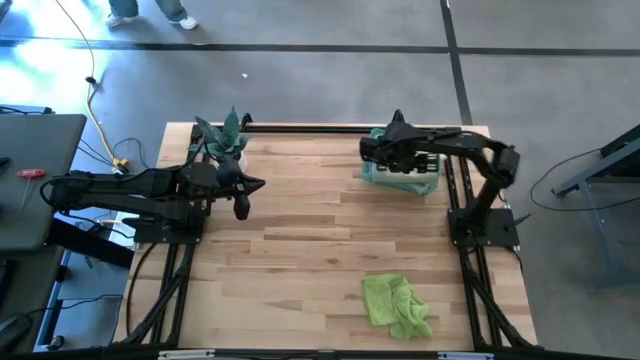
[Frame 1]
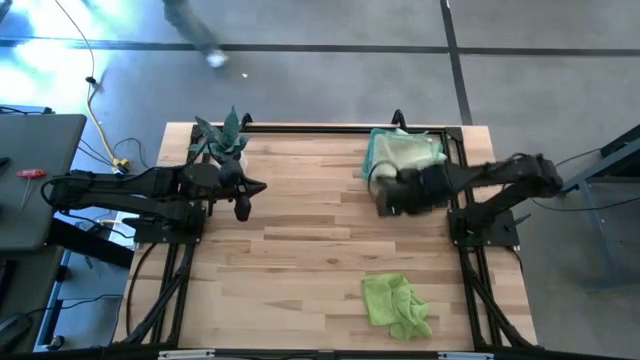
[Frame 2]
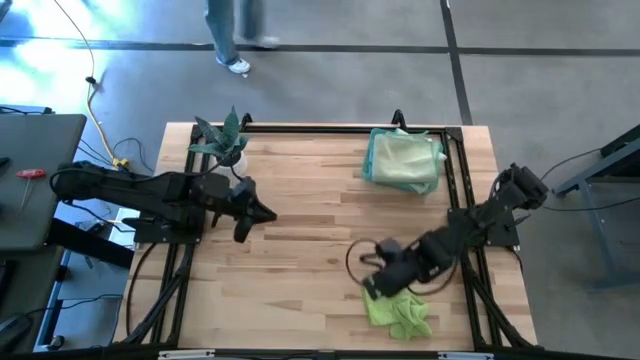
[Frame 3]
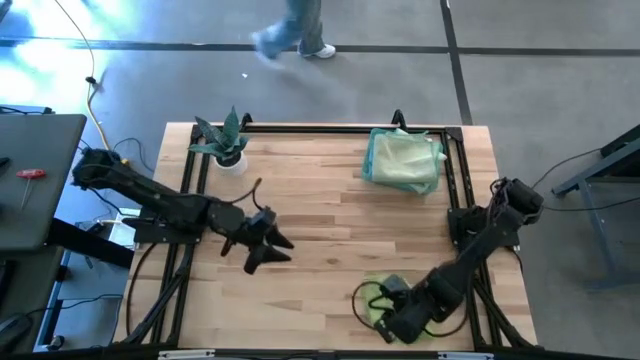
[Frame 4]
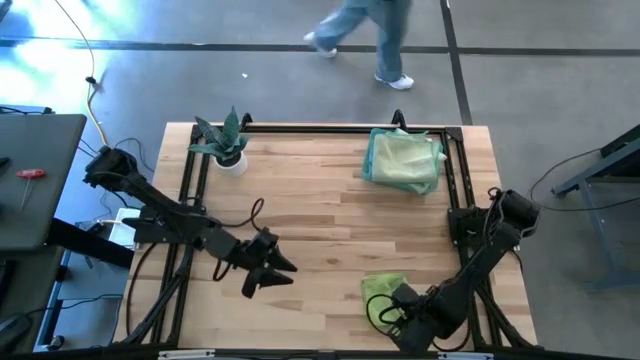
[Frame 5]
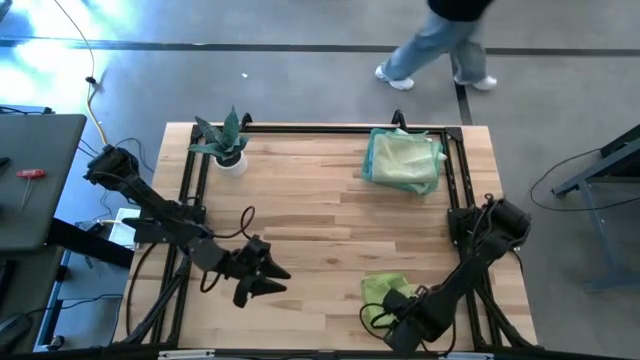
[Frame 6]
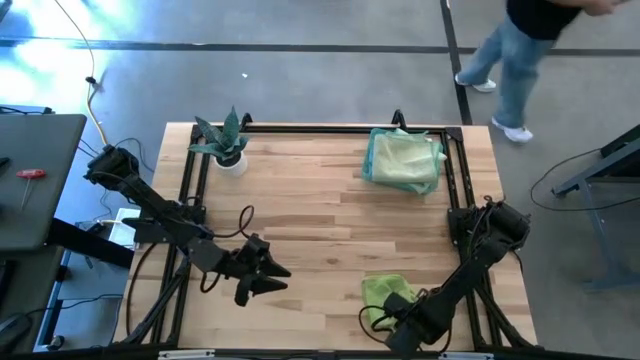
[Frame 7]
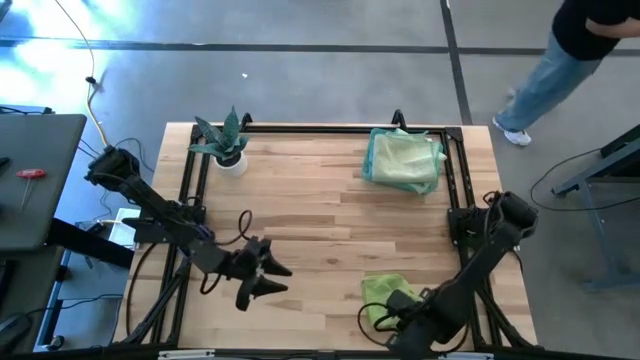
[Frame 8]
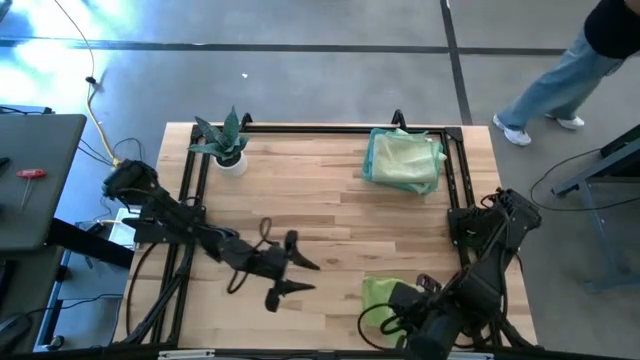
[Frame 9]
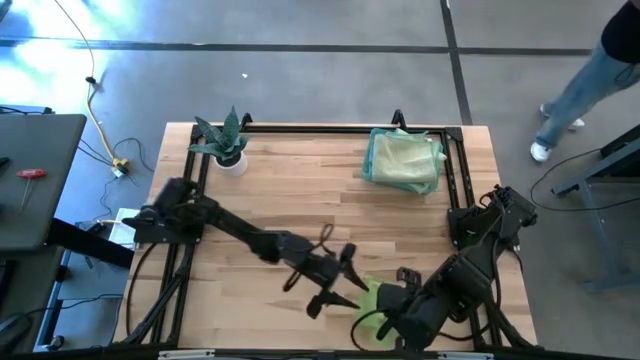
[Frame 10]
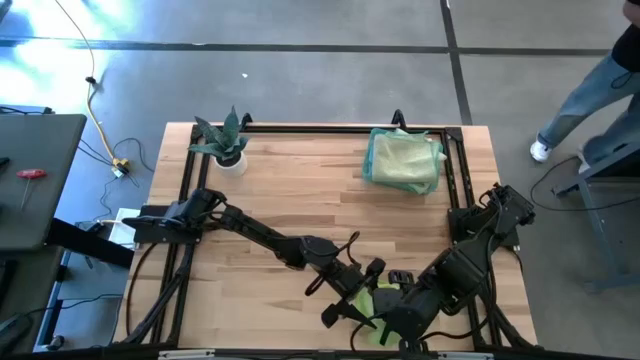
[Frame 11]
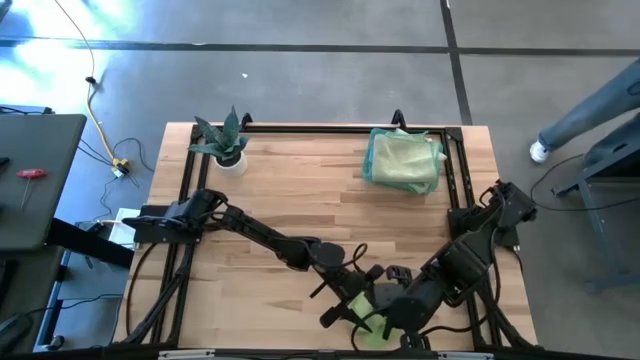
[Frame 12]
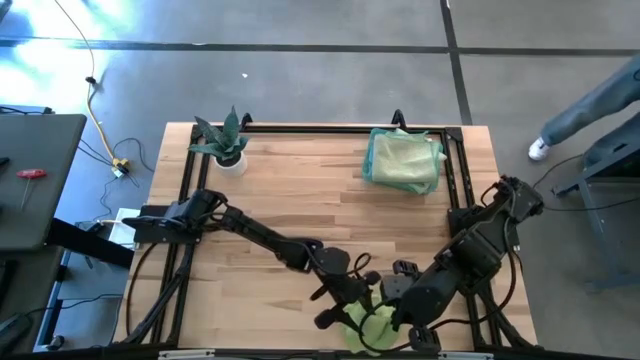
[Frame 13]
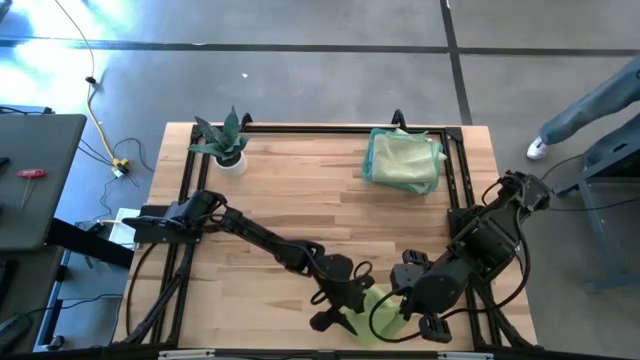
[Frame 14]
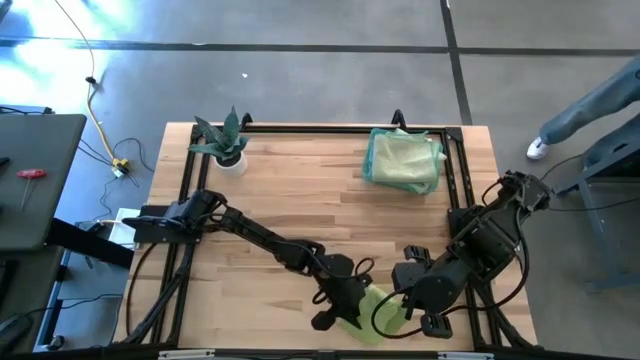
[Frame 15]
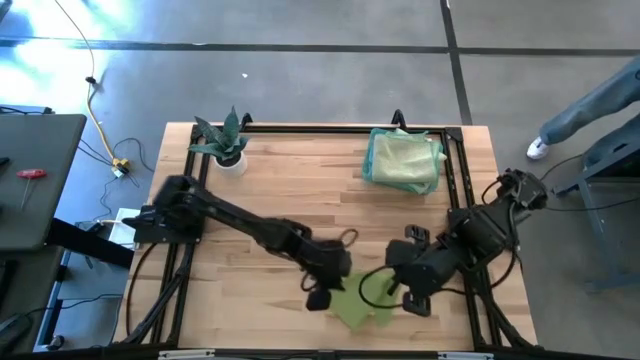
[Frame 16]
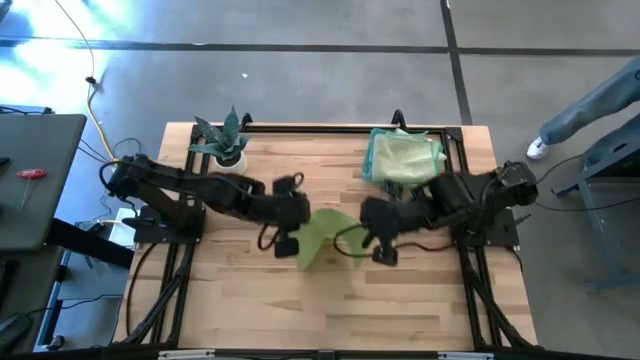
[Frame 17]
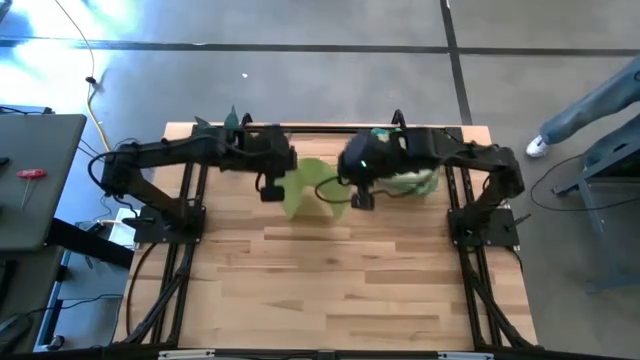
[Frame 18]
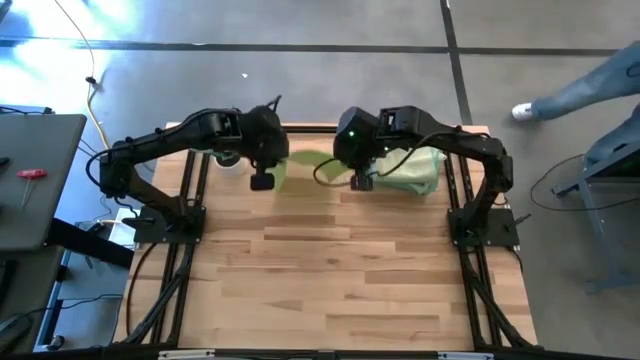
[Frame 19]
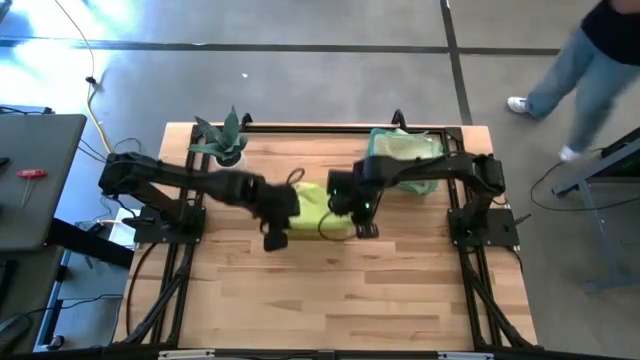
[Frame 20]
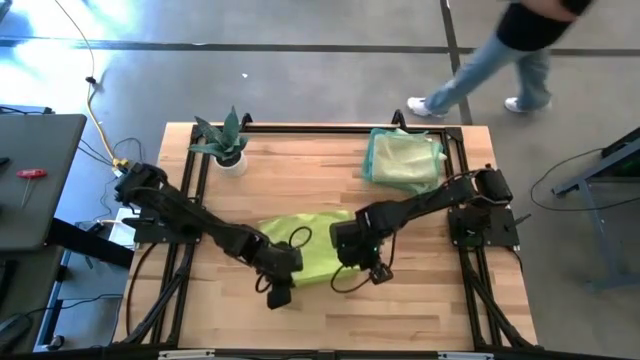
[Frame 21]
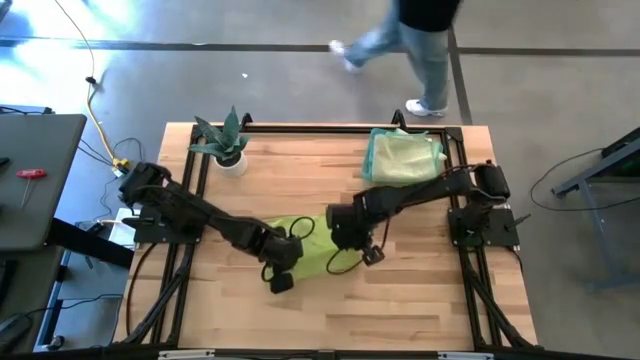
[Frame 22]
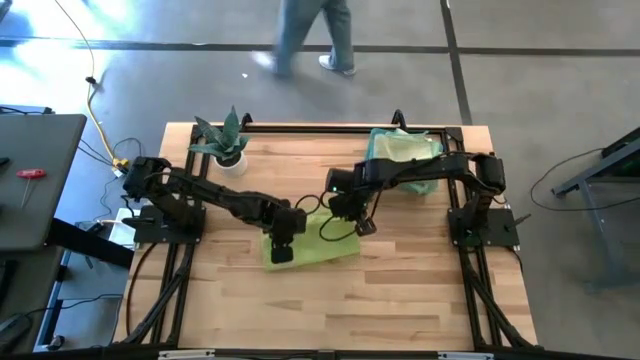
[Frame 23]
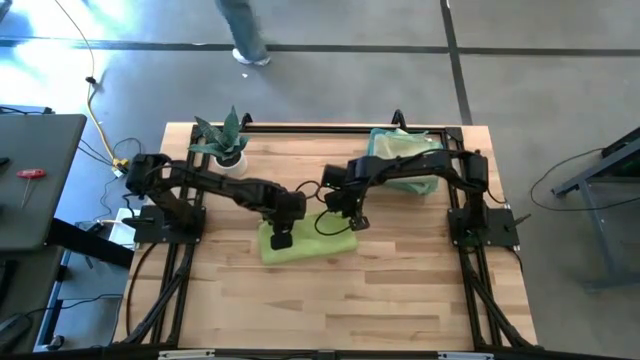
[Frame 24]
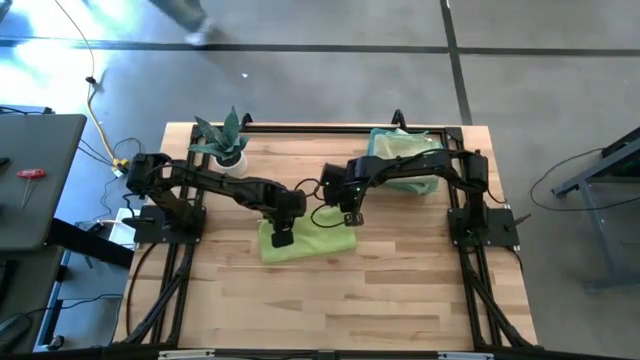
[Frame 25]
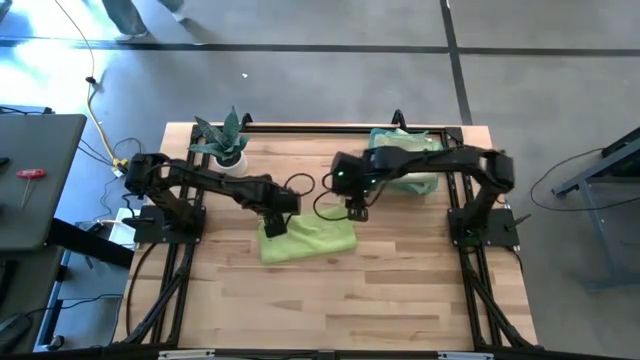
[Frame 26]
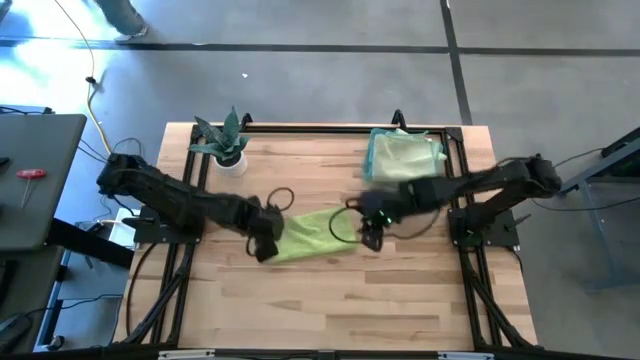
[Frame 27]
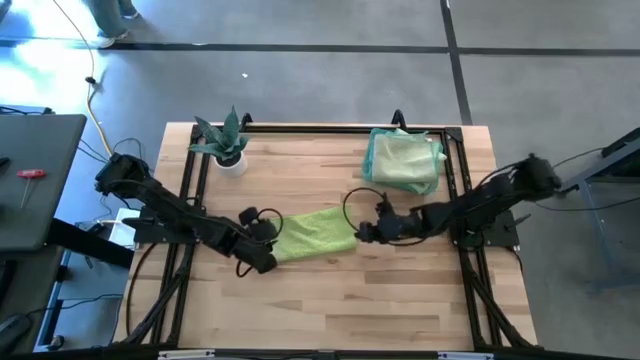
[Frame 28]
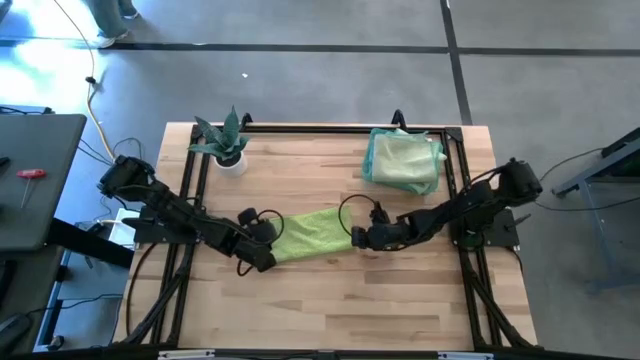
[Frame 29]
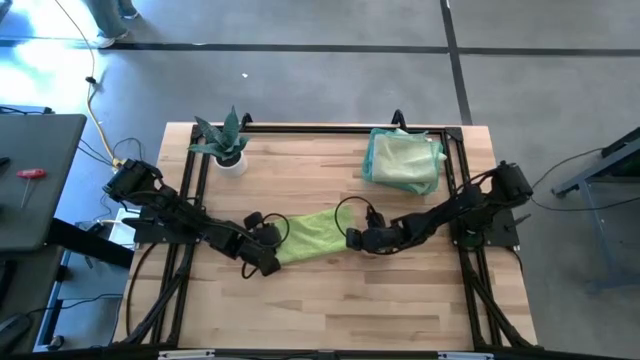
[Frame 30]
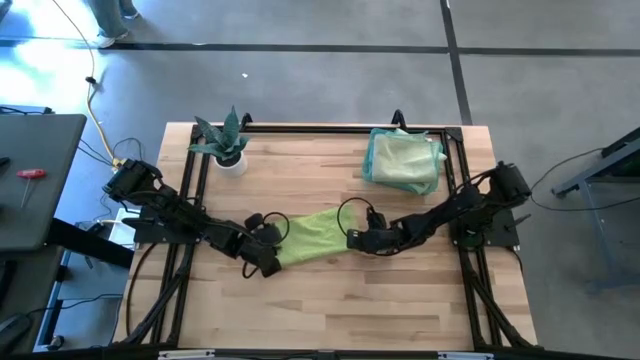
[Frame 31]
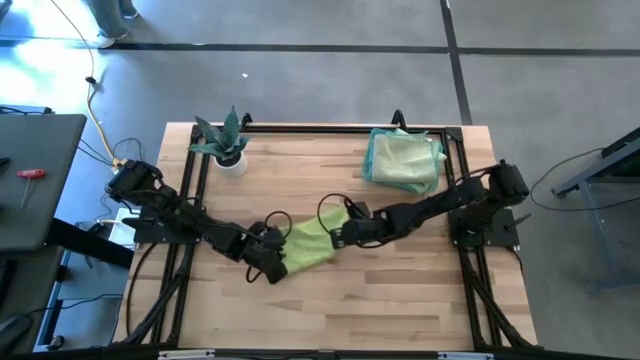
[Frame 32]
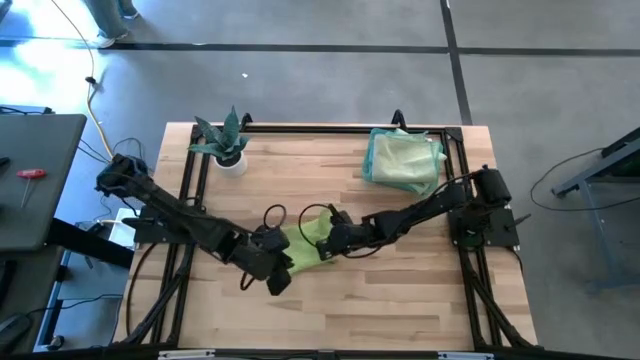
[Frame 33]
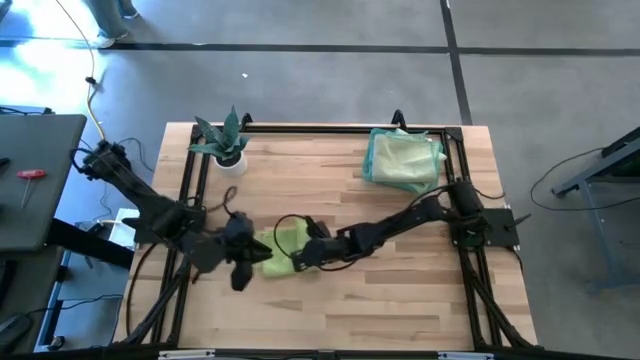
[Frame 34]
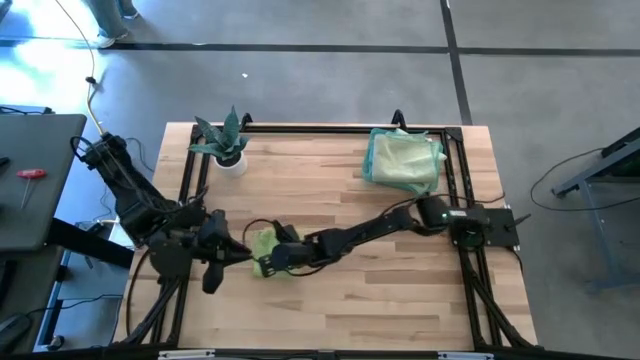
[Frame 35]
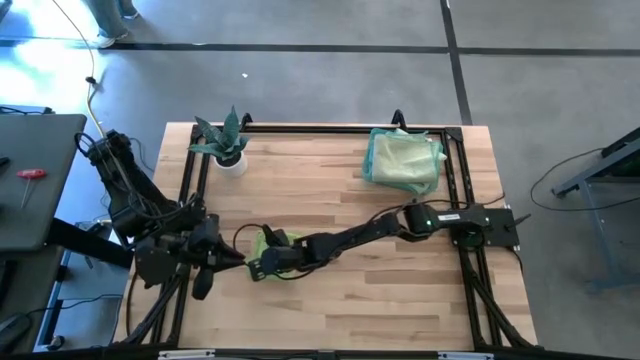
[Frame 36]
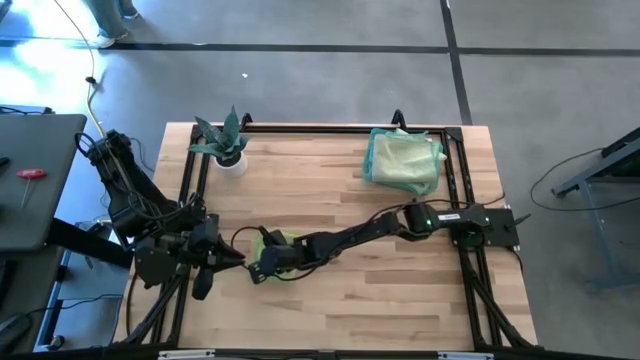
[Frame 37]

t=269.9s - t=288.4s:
Task: Fold microfiber towels
Fold the light green microfiber cloth

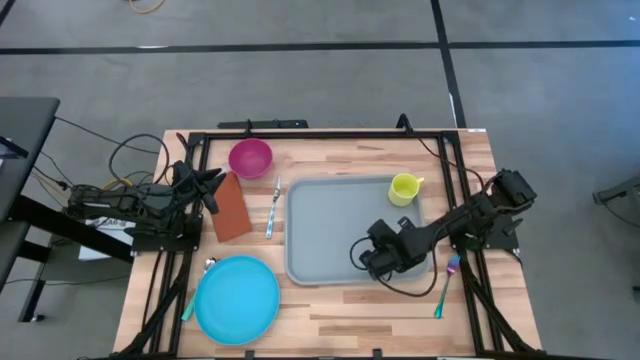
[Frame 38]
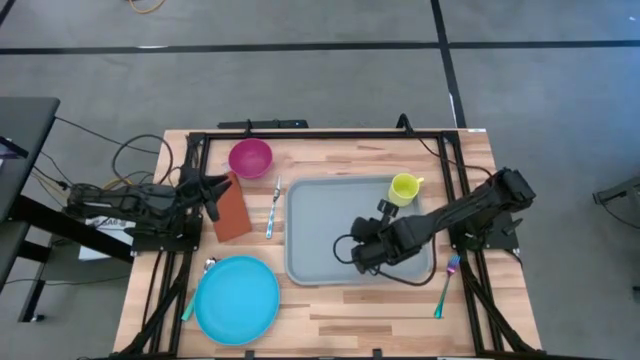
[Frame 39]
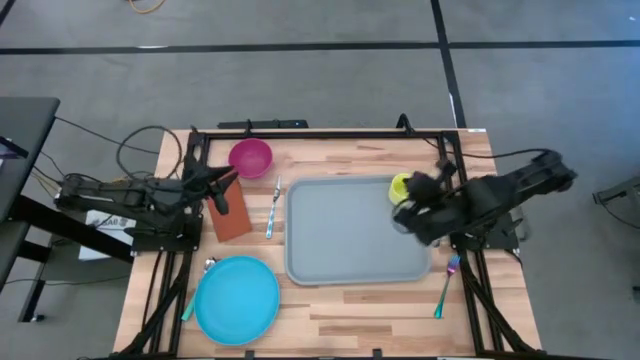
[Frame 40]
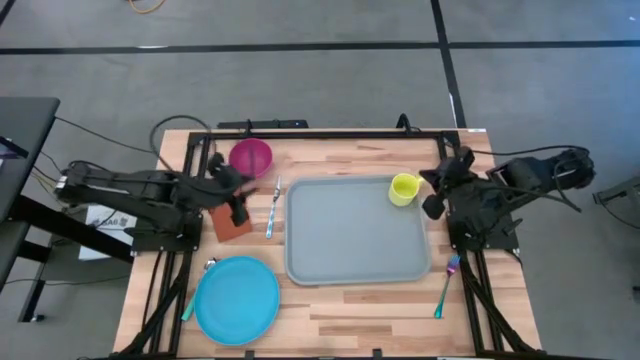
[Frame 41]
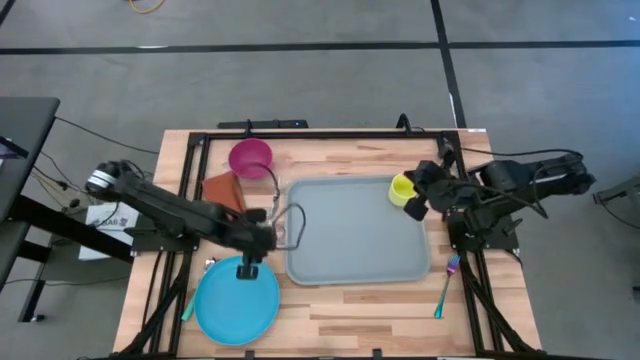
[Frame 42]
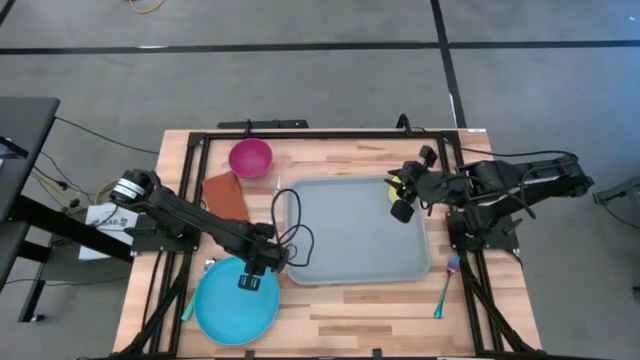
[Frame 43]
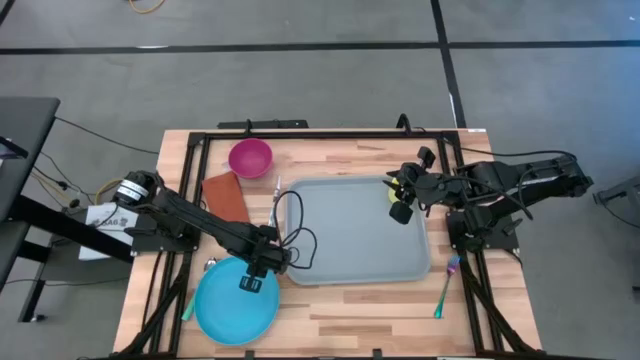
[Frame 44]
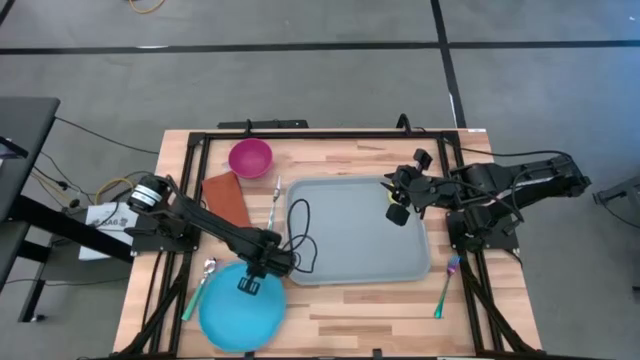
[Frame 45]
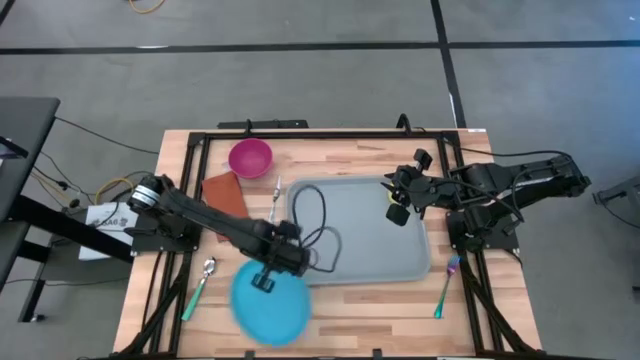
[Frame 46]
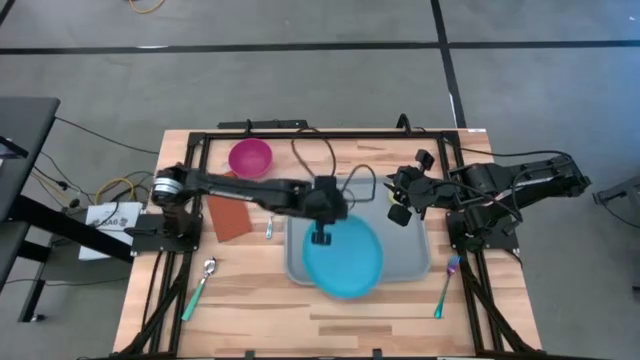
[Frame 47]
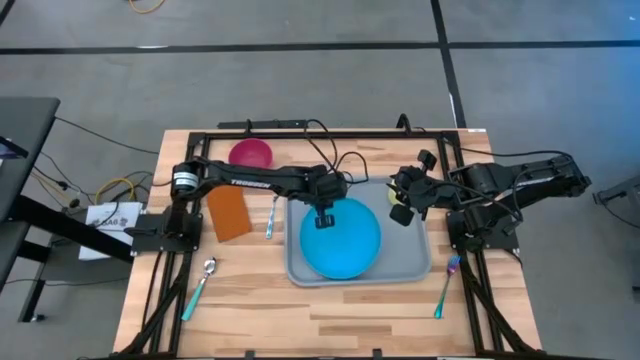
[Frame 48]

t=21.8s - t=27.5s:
Task: Set up tray
Put the blue plate on the gray tray to the left of the yellow mug
